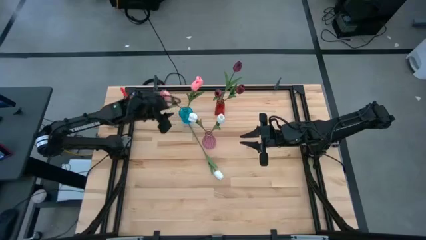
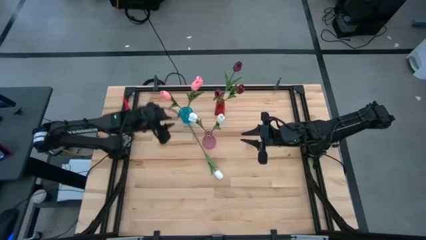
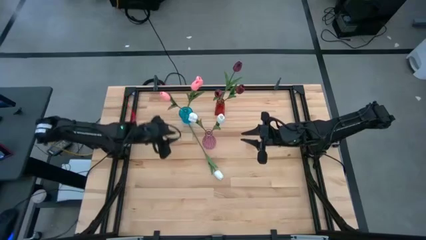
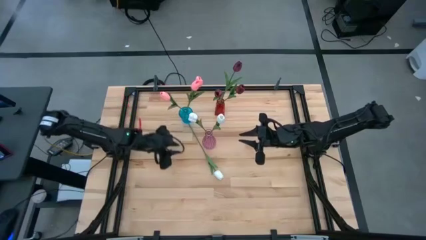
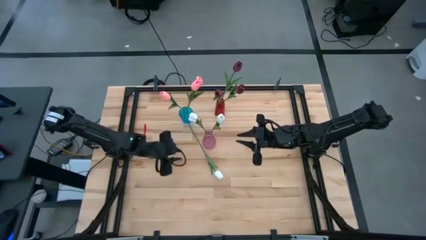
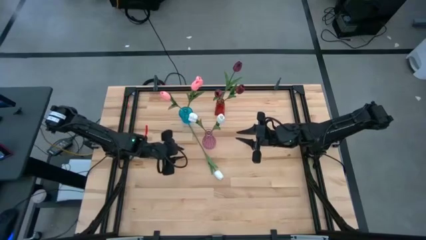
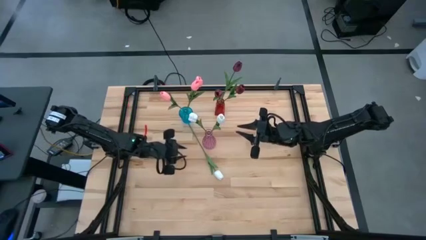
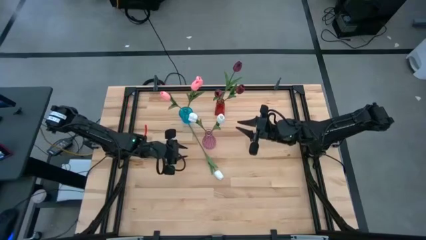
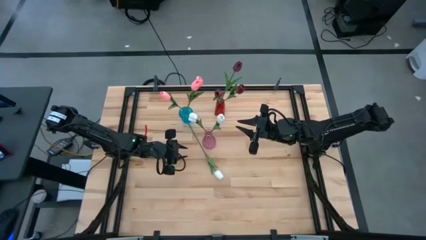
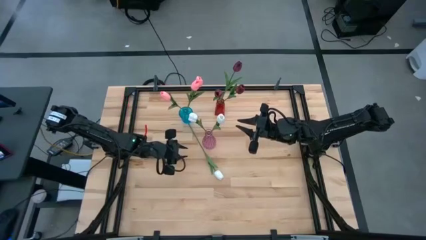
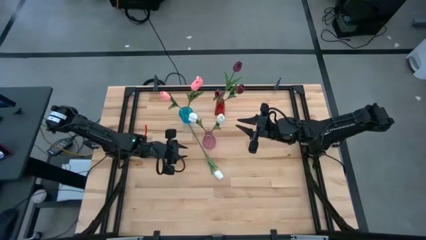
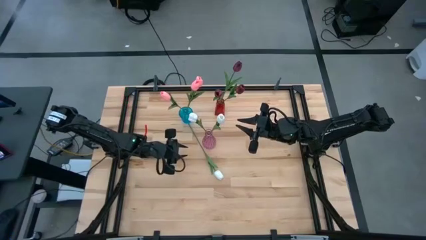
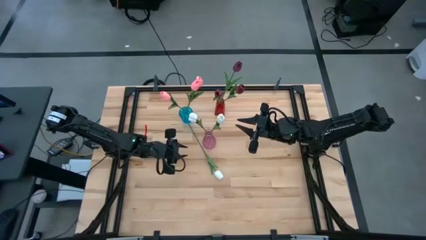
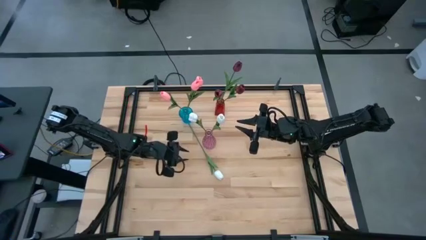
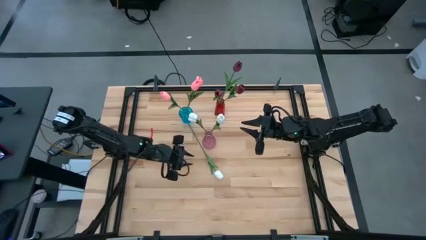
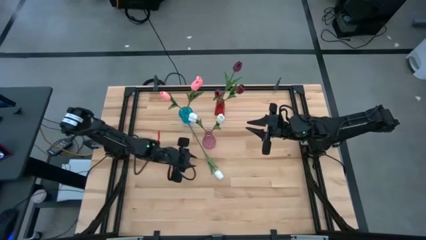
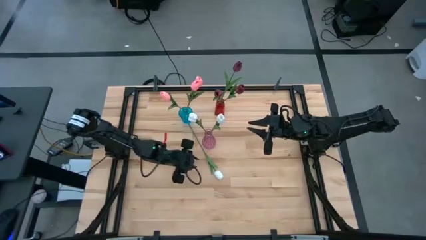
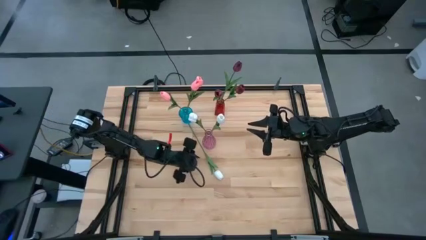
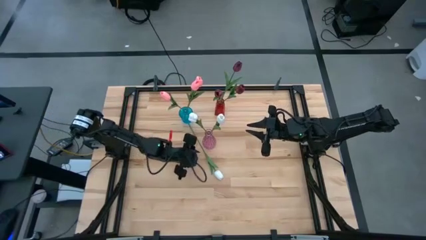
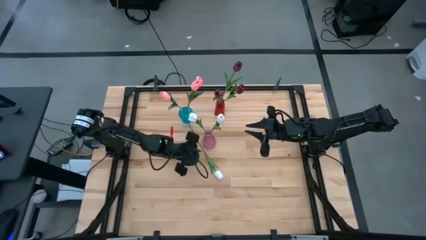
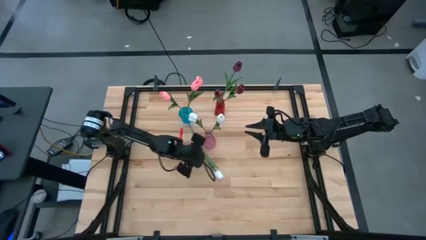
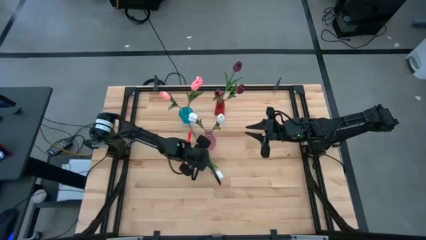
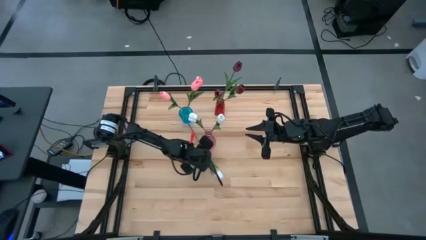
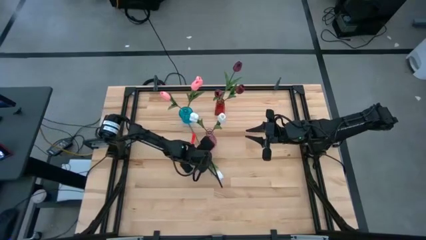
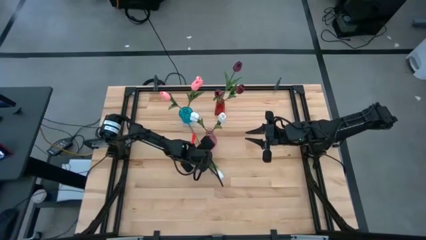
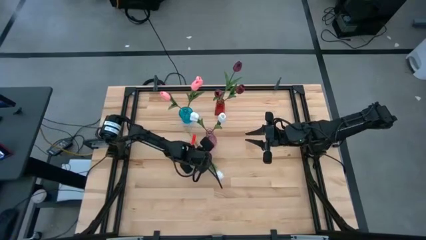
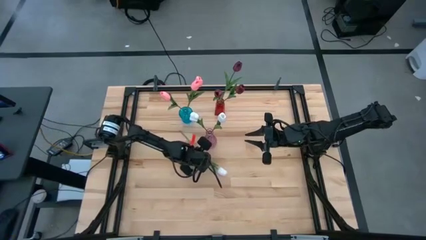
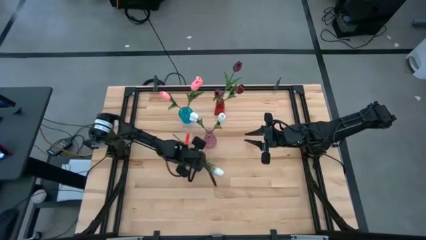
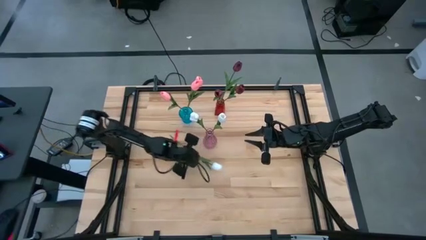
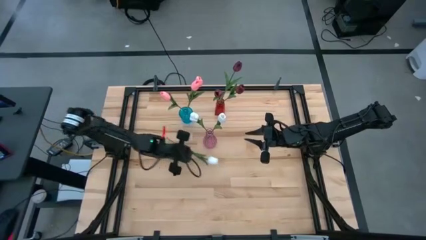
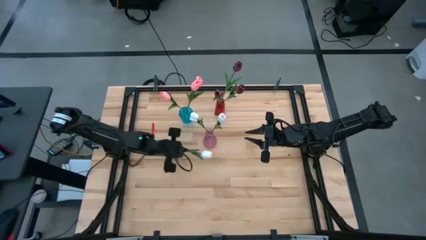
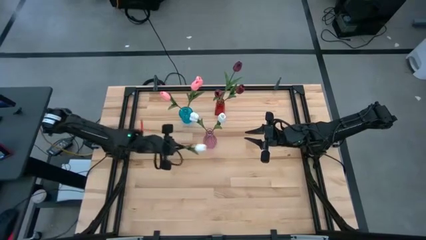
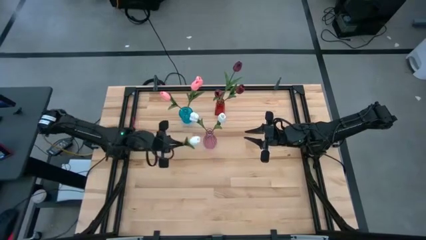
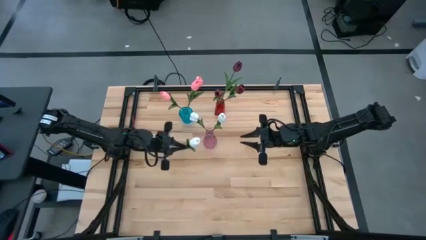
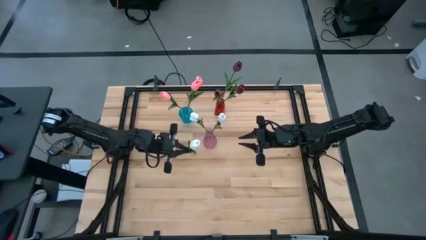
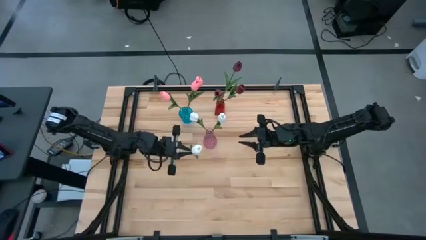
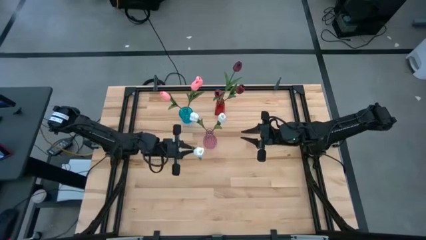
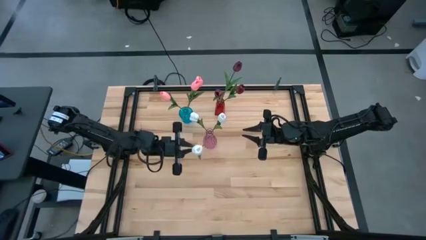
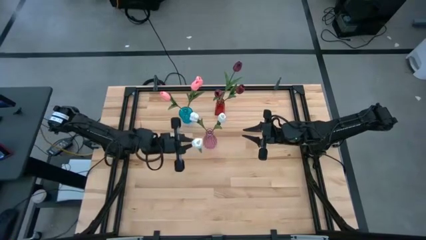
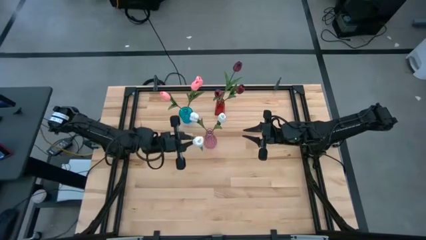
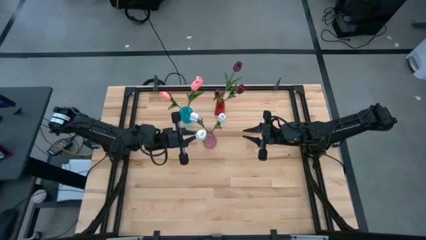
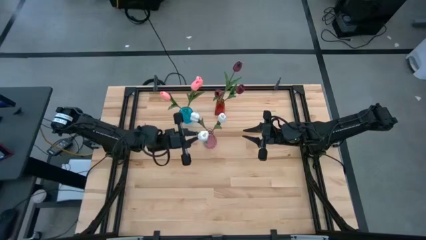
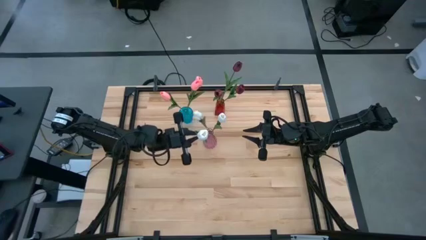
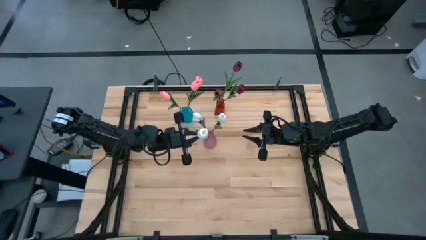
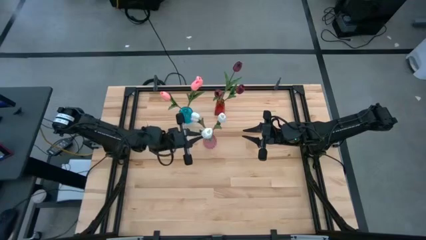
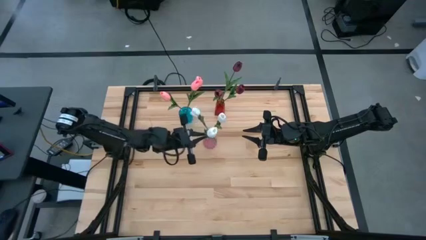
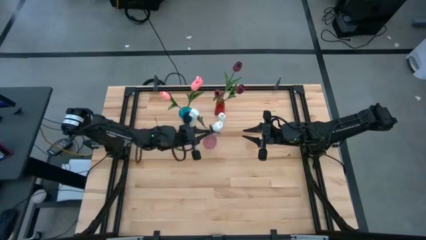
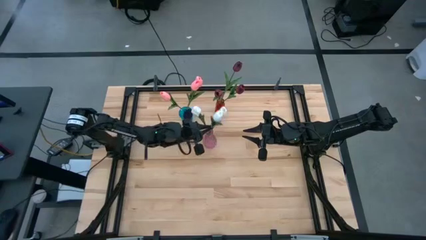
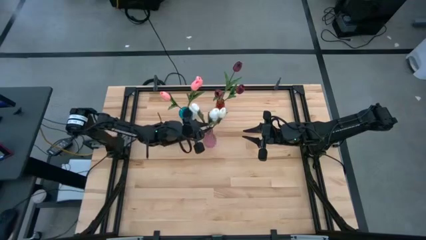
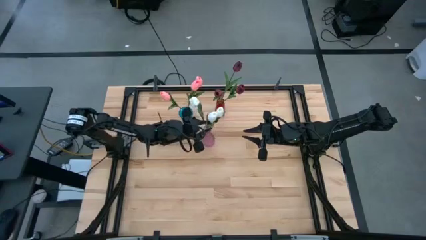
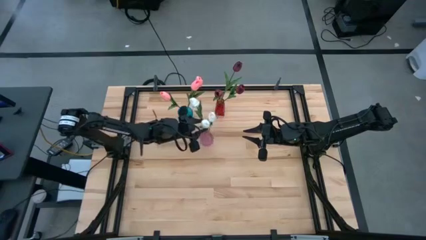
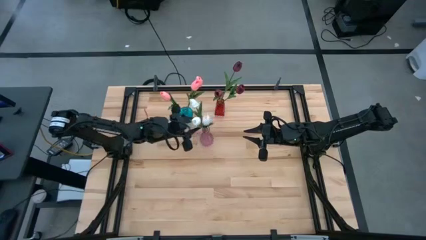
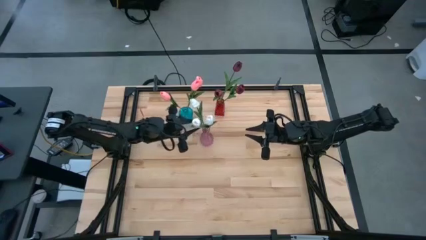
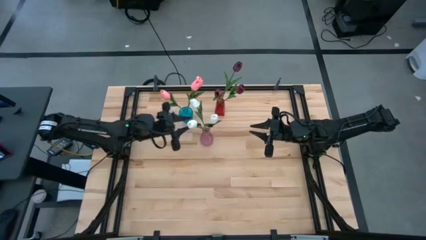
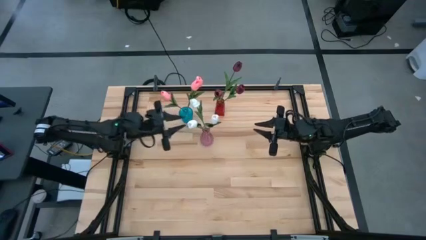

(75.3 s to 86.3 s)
Task: Sort flowers into vase by color
Put the white flower into the purple vase

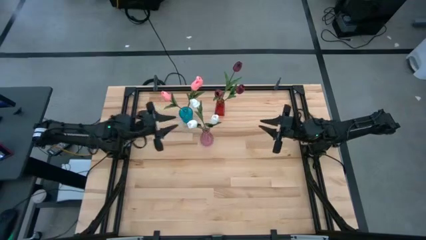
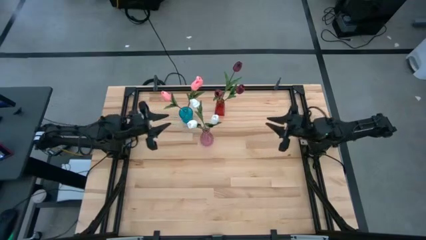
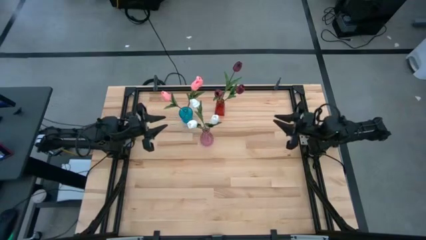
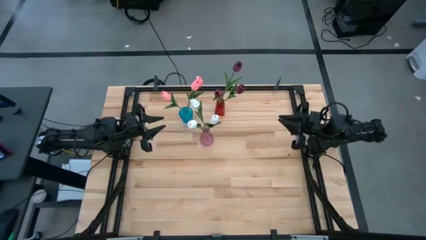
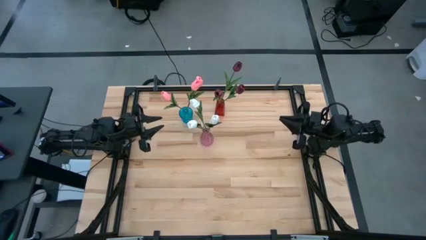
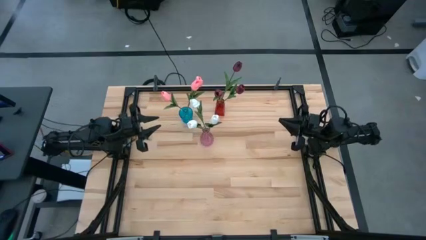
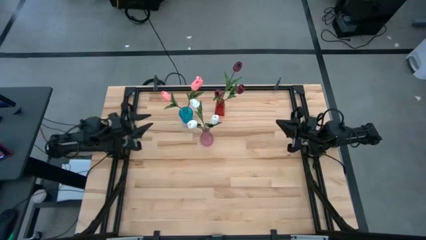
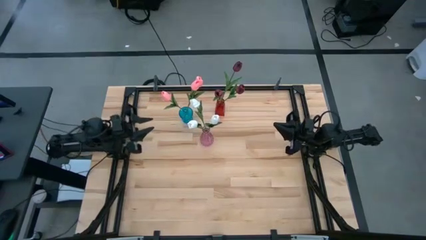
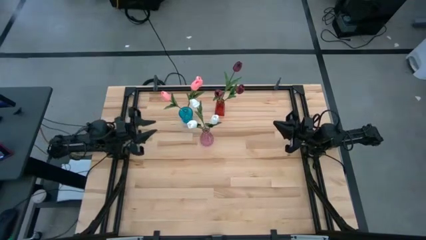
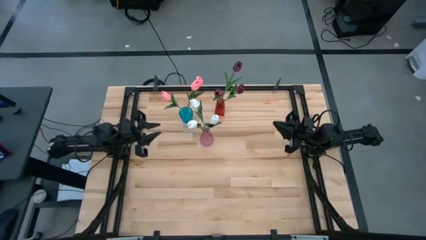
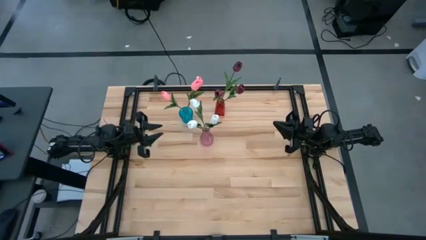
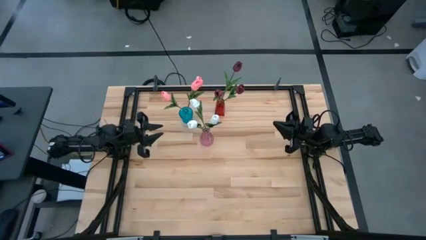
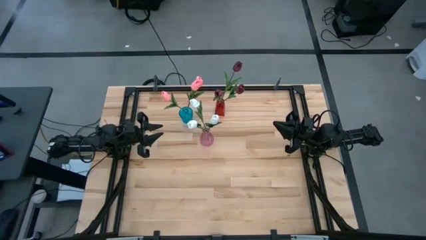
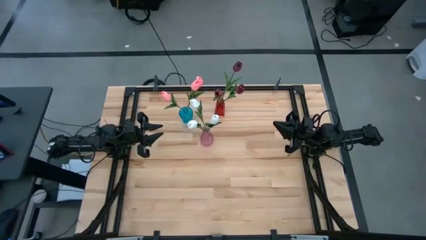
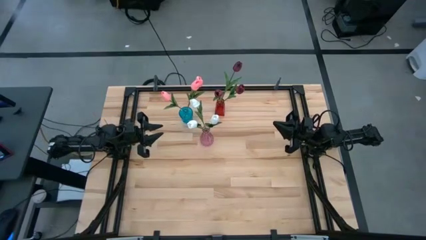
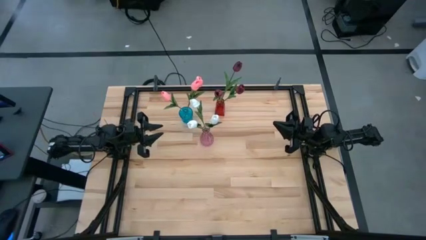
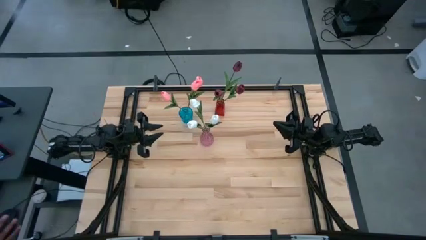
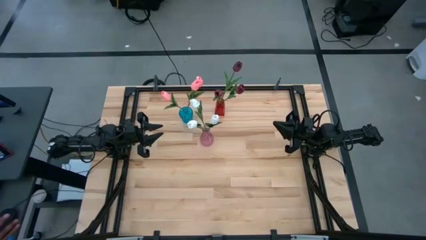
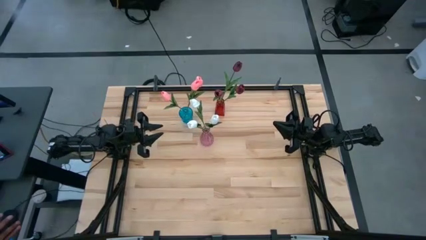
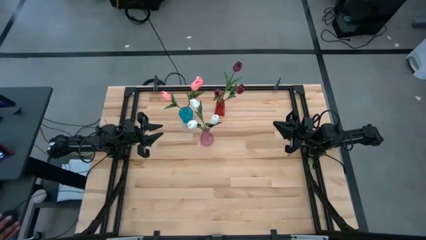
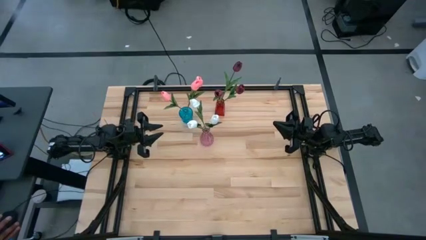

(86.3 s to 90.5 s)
Return to Home Position

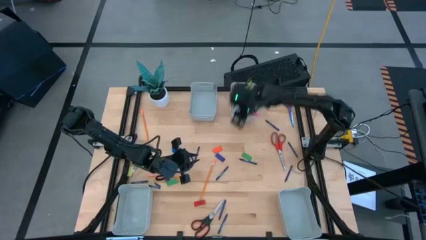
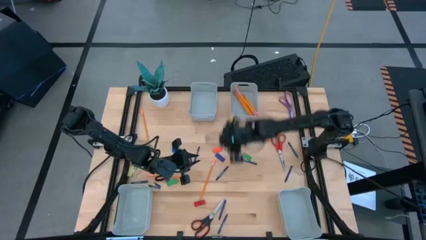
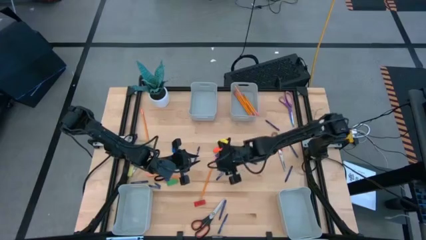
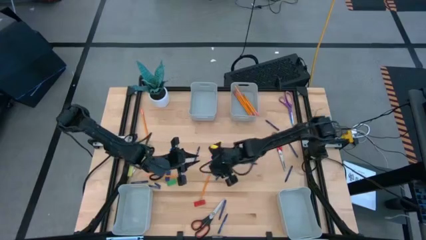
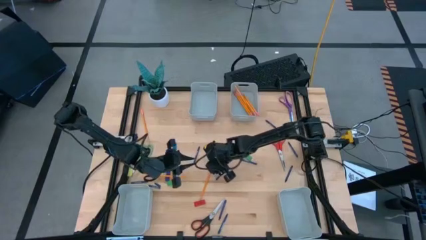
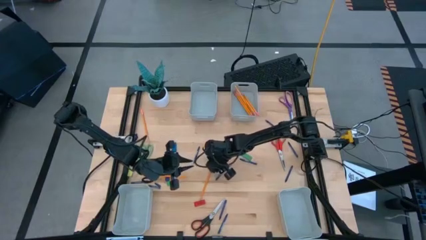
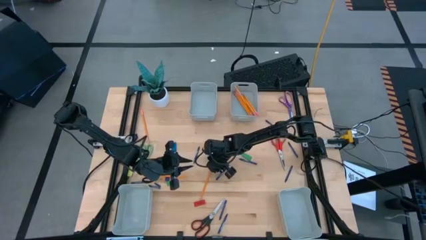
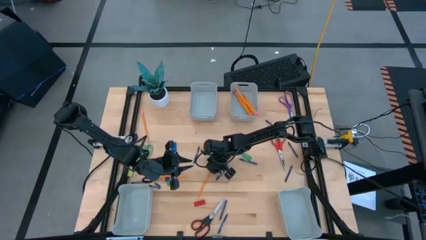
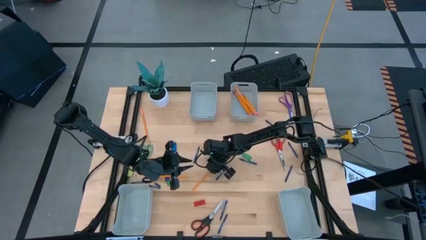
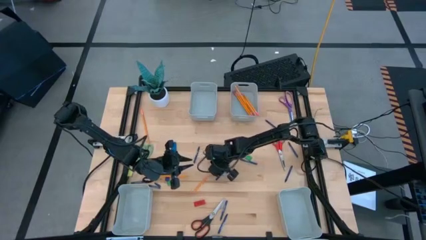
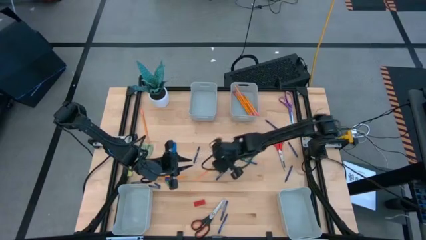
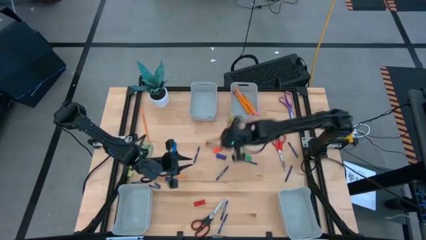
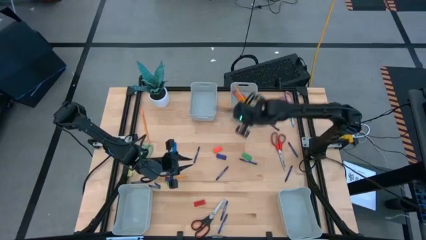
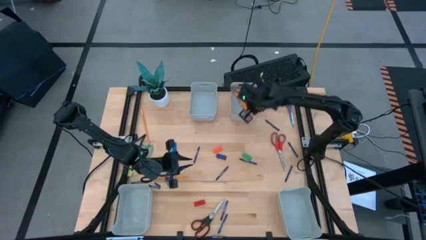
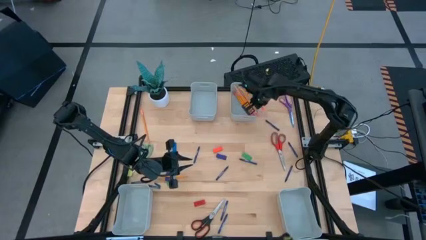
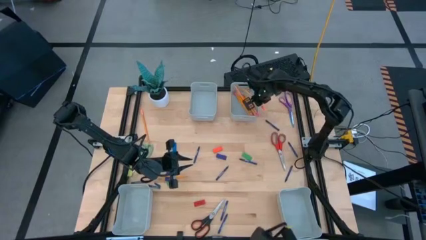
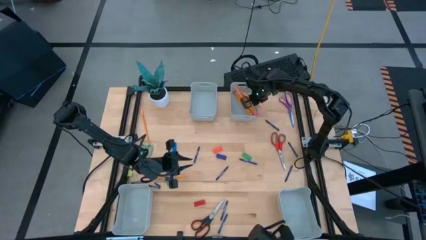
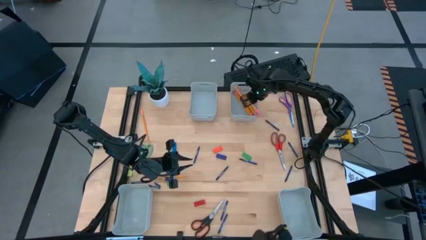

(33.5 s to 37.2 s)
Task: Sort crayons/erasers/pens/pencils in bins
Put the yellow pencil into the top right bin
